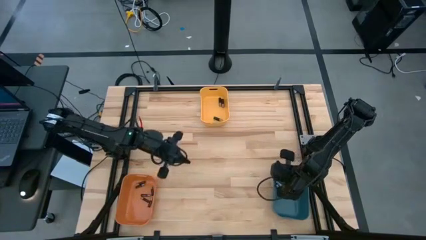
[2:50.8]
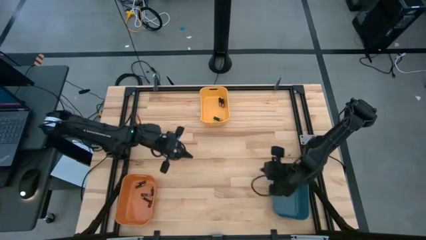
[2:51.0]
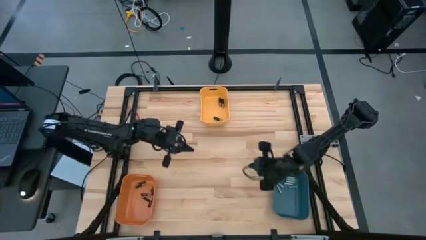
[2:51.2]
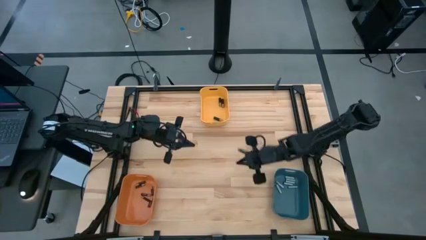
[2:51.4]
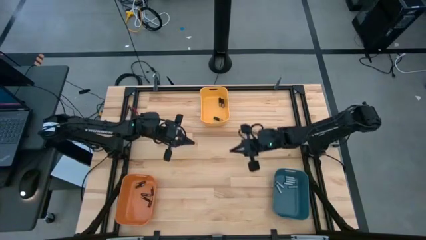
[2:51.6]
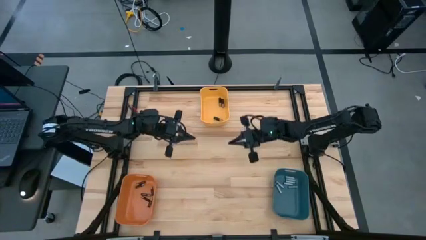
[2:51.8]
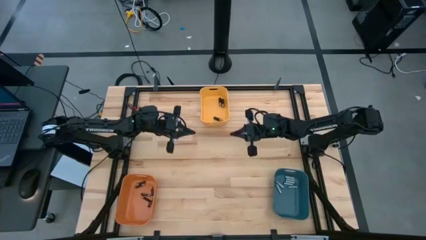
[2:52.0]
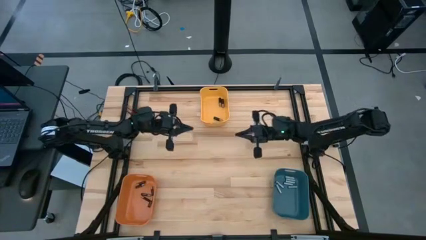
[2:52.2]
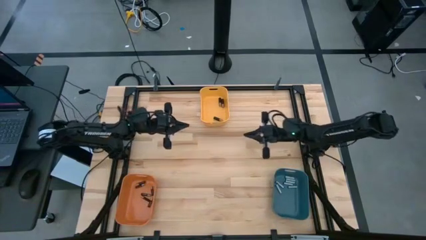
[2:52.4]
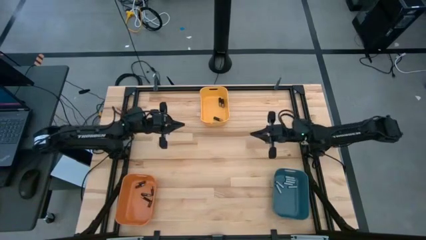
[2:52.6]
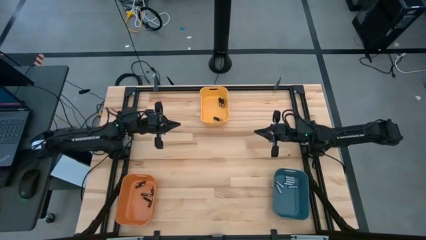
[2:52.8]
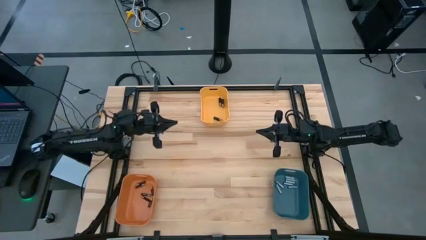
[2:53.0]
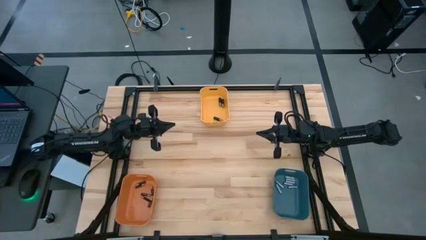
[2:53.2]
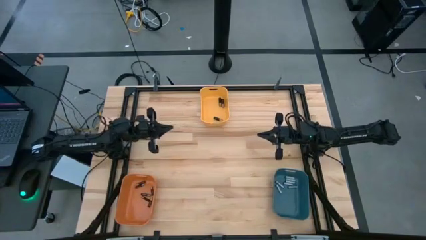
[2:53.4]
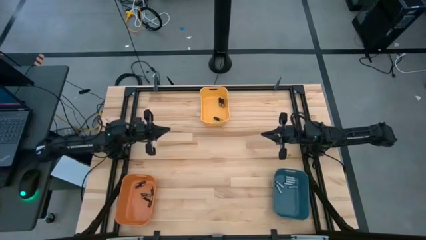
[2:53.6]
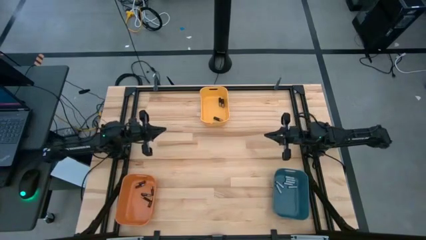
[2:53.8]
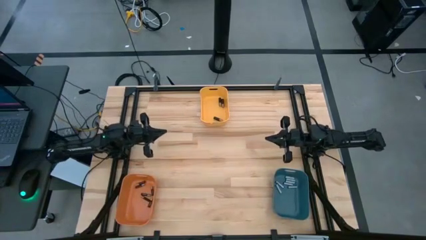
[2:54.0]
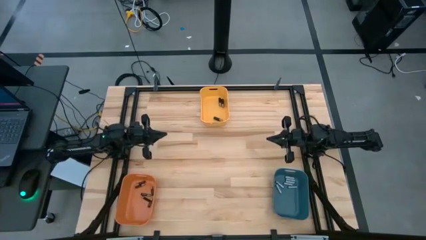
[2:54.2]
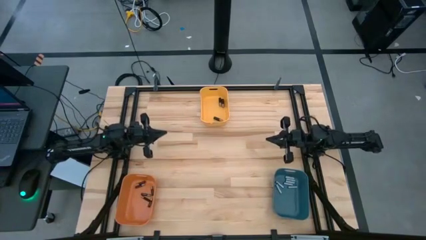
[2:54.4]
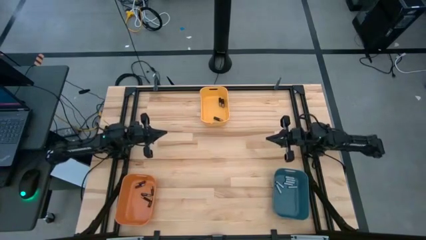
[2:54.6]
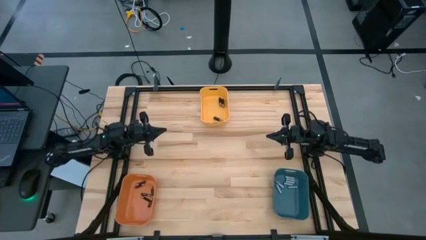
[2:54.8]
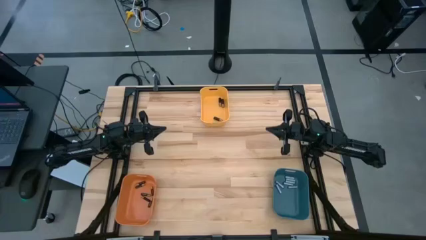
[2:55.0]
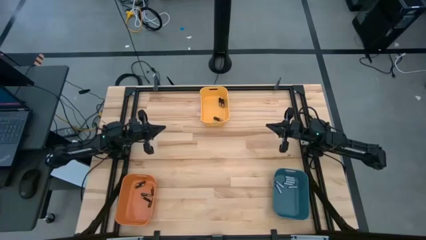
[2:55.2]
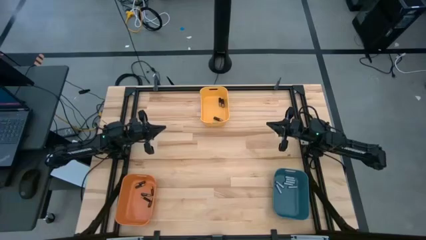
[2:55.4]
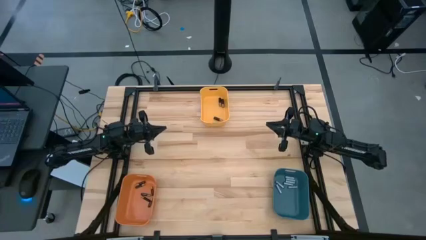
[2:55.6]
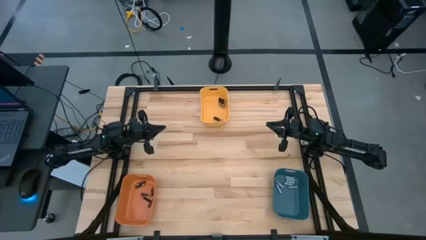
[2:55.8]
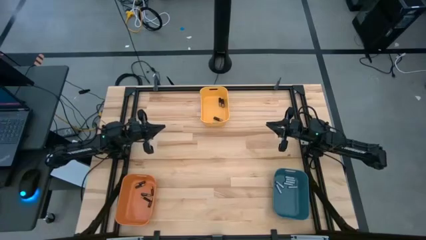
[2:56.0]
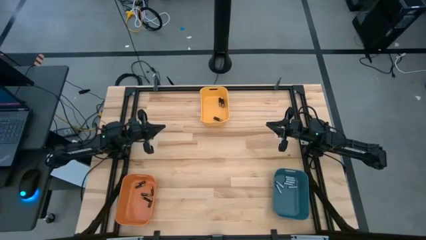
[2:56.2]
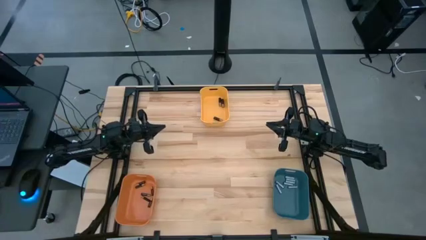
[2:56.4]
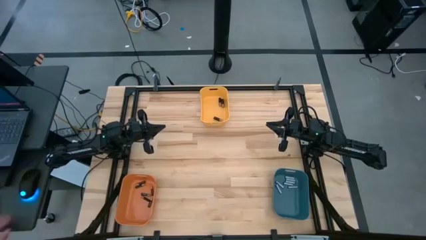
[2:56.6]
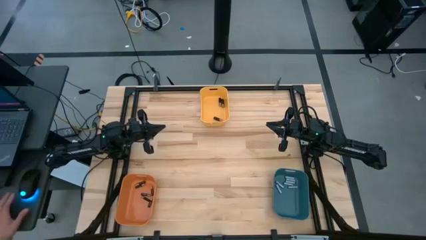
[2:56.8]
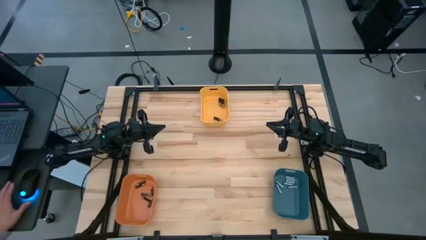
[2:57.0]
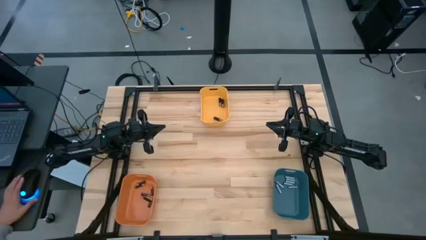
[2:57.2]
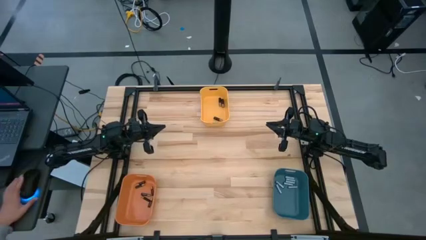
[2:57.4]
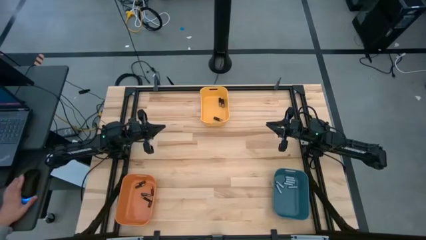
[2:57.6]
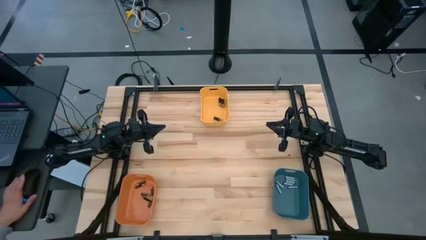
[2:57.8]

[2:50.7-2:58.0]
Task: Sort batteries
Return to Home Position

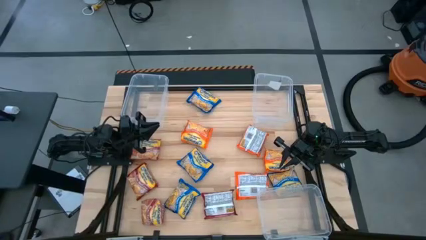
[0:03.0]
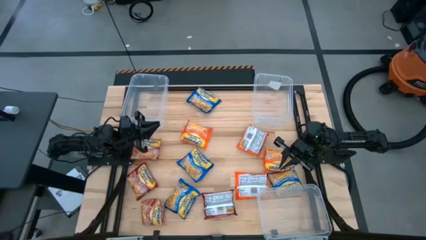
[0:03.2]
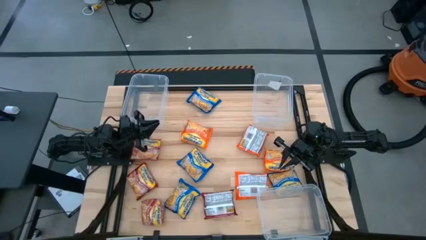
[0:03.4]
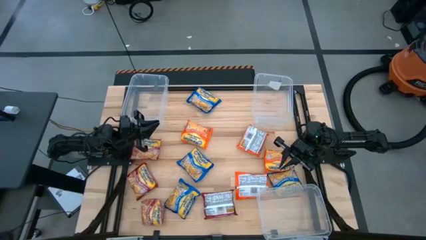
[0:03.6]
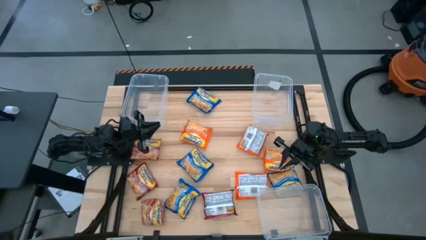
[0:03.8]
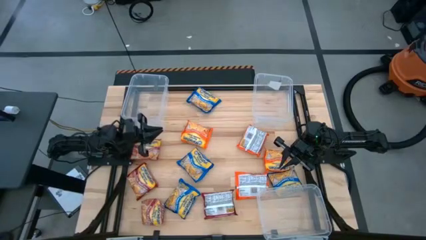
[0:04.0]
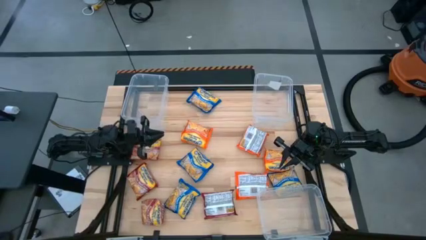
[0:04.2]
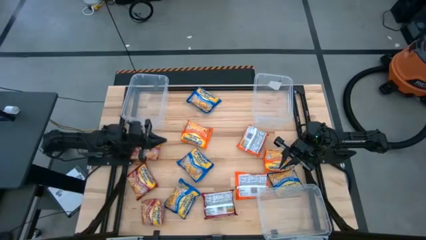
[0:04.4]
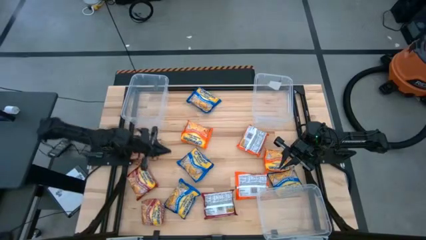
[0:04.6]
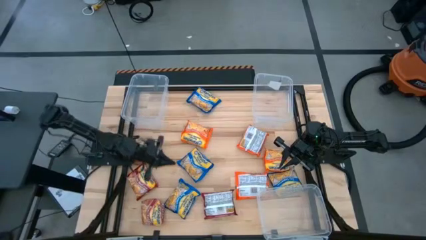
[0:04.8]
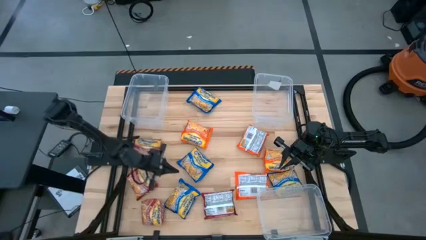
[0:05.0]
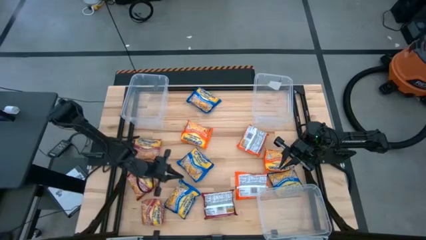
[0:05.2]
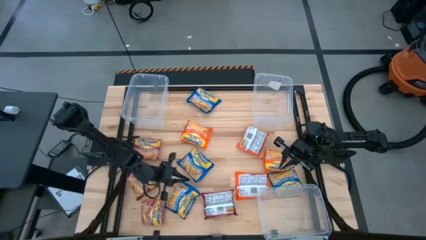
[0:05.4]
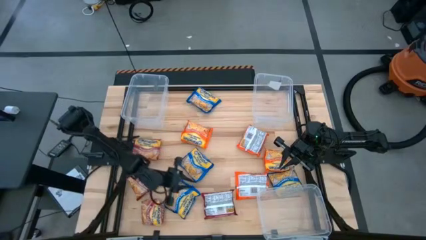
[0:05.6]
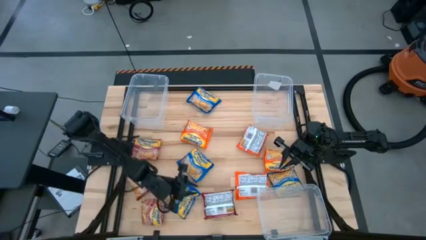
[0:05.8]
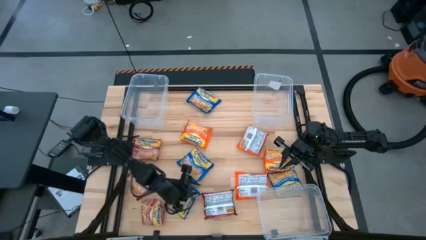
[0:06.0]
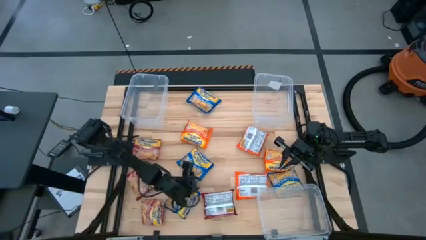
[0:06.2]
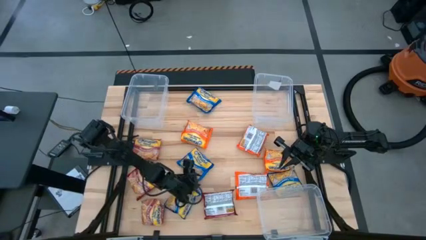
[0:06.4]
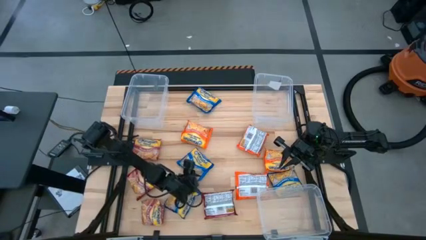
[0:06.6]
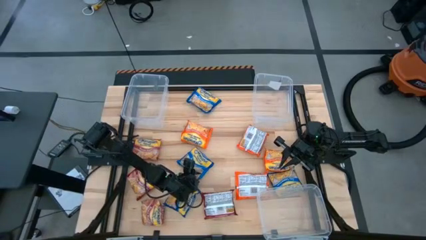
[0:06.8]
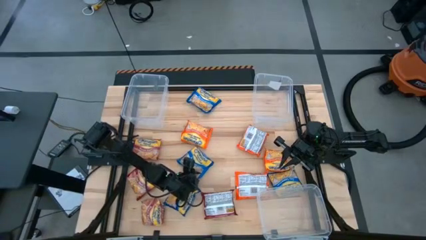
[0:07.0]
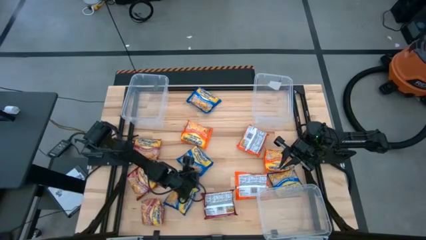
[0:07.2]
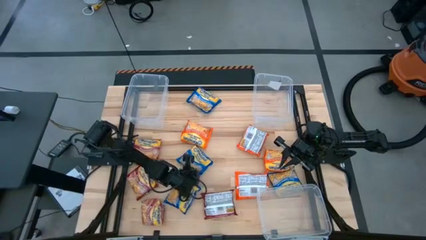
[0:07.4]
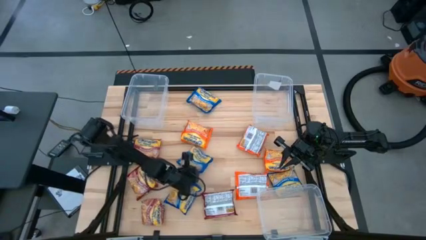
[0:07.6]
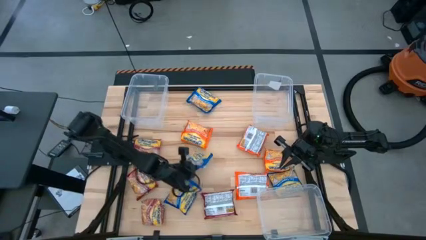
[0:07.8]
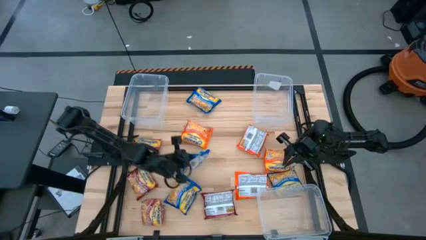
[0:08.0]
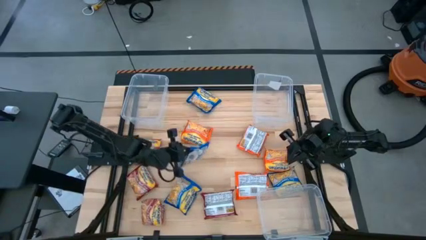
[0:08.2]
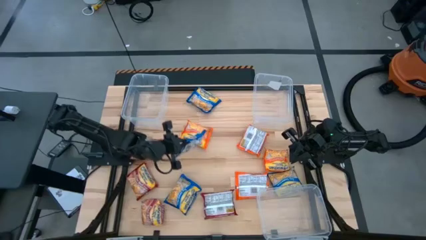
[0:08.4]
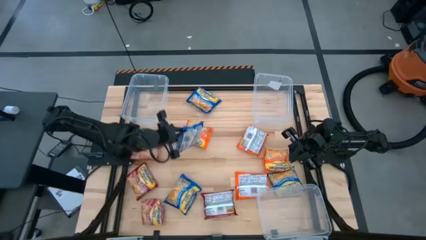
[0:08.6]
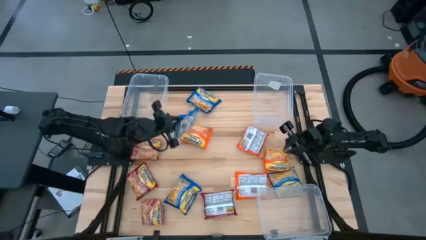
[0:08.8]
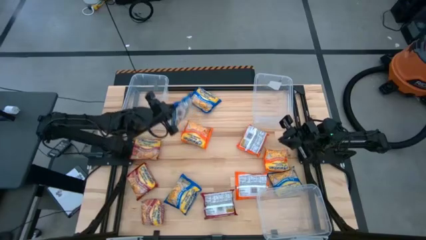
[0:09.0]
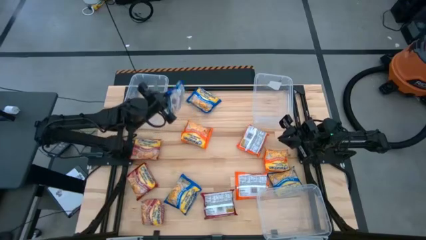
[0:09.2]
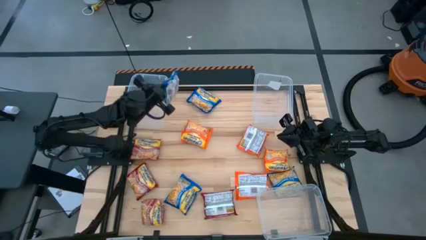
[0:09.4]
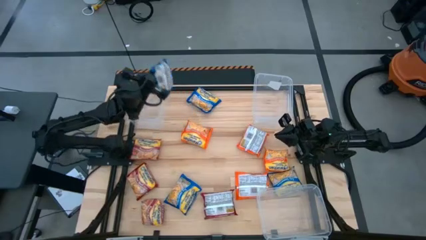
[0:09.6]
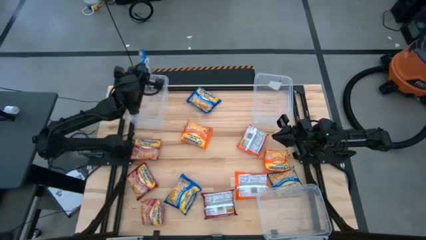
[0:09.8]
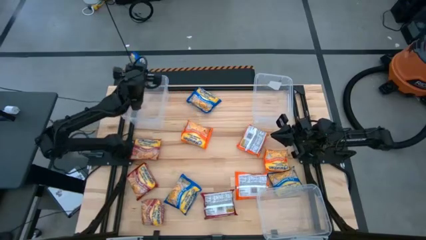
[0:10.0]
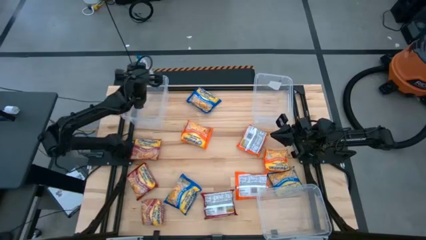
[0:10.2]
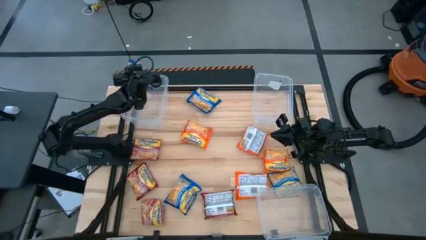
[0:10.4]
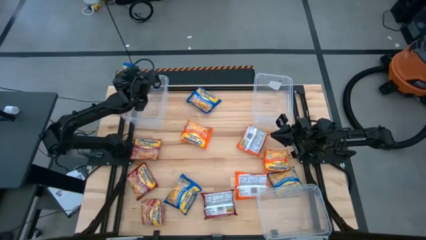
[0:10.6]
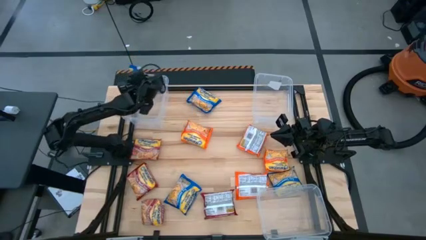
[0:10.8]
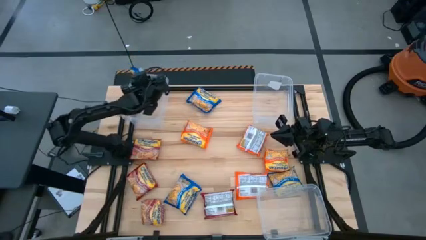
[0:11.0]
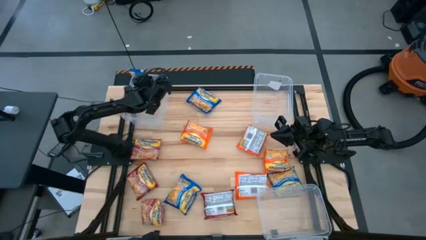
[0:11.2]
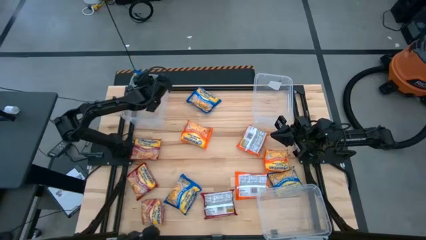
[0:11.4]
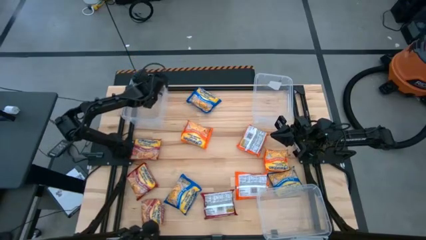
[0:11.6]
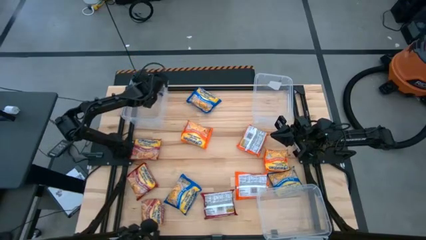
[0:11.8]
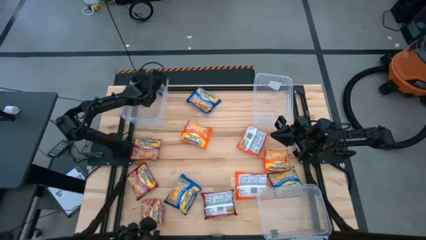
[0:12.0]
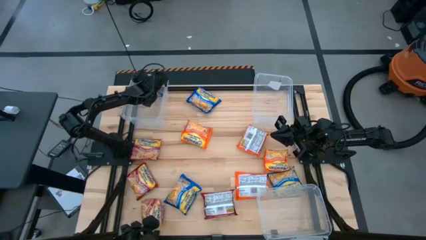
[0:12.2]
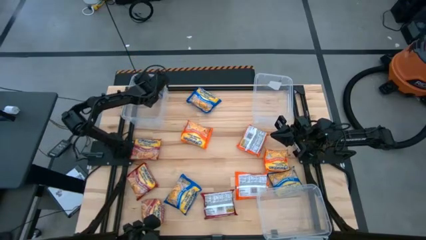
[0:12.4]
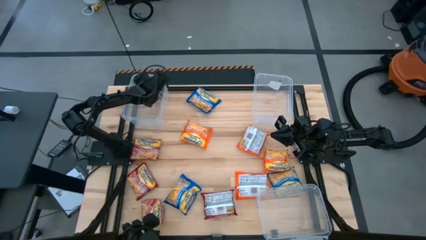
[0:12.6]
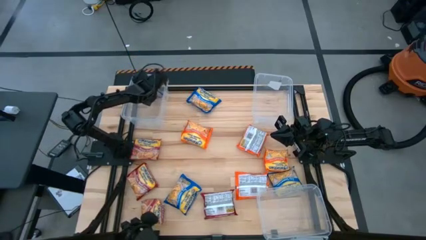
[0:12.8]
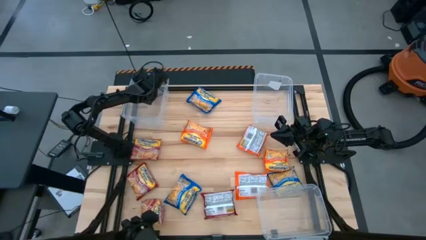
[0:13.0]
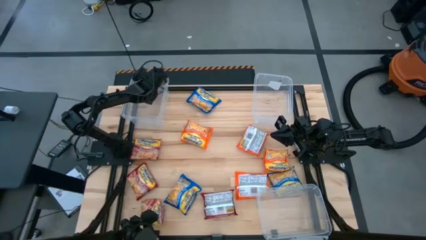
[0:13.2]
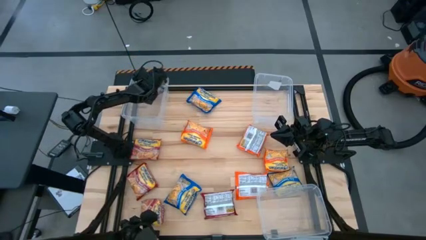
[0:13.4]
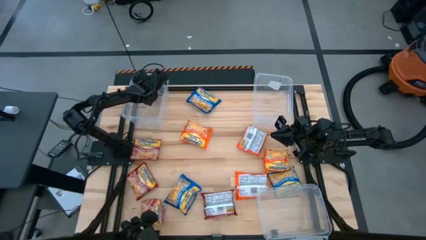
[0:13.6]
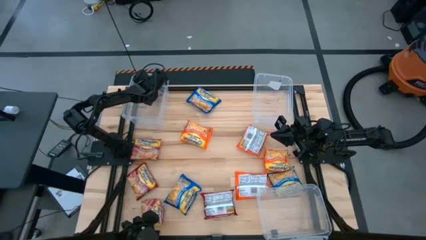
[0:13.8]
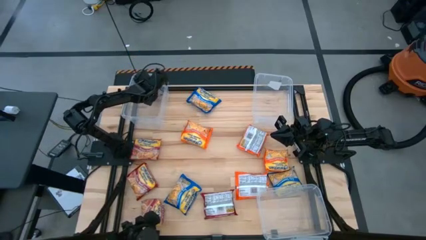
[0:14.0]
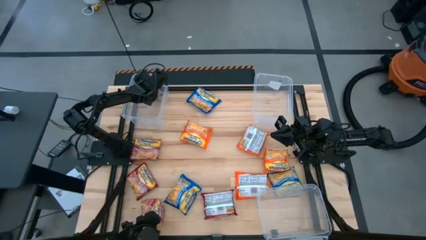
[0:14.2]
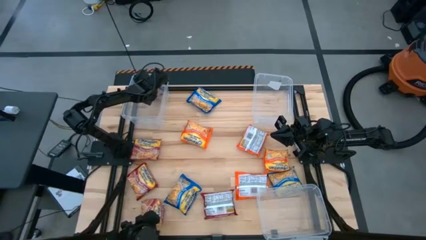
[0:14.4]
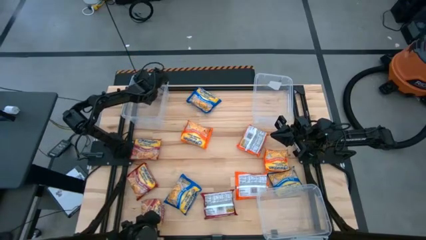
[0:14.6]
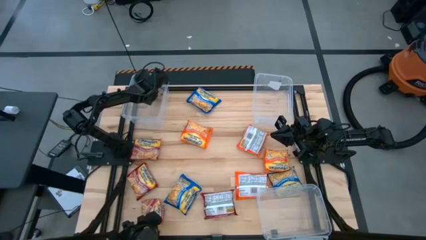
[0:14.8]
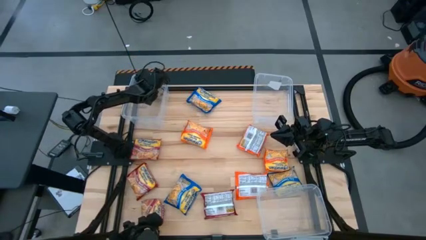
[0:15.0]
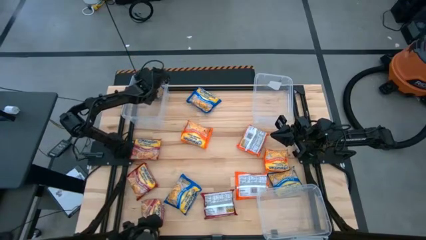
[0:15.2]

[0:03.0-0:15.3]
Task: Sort Maruchan noodles
Put the blue noodle pack into the top left transparent bin
